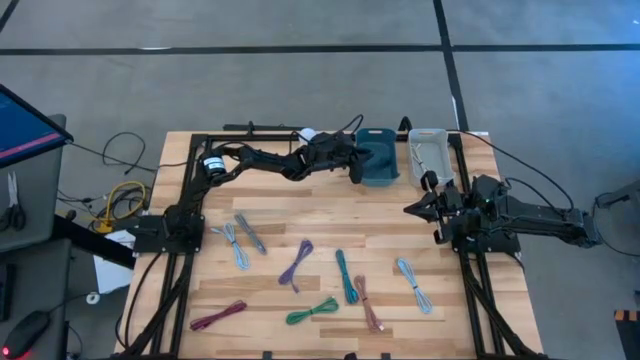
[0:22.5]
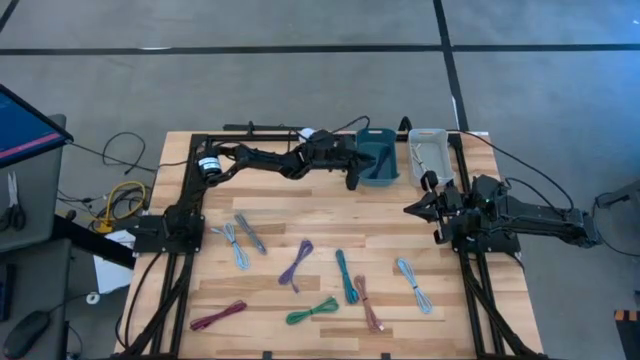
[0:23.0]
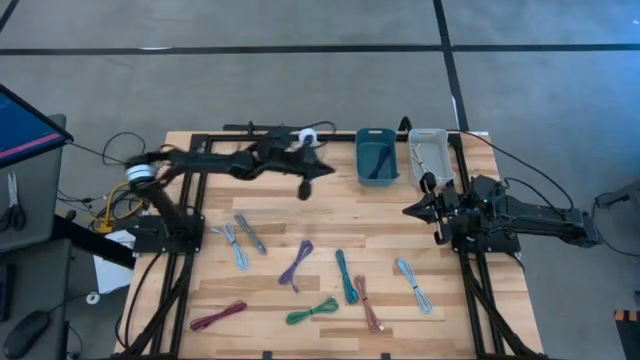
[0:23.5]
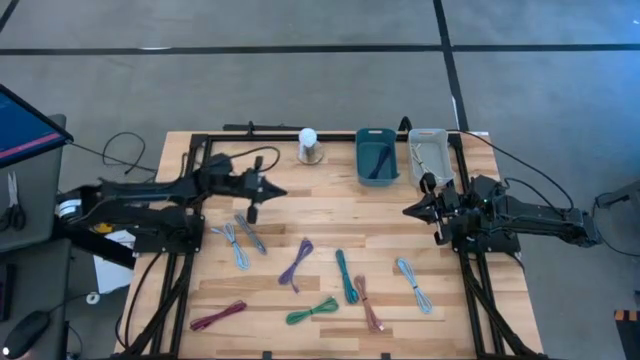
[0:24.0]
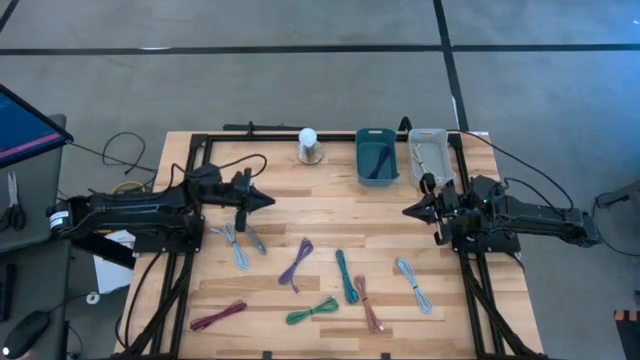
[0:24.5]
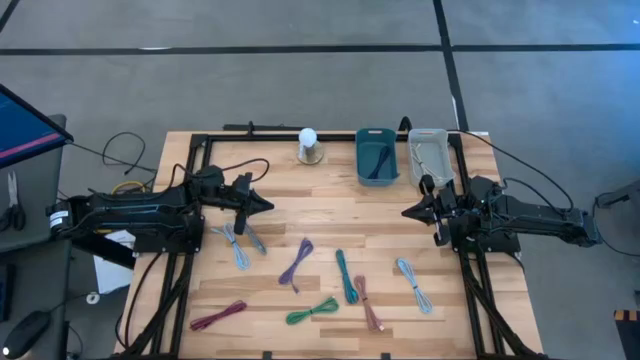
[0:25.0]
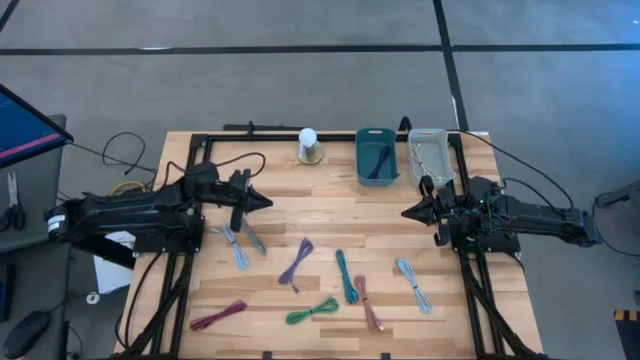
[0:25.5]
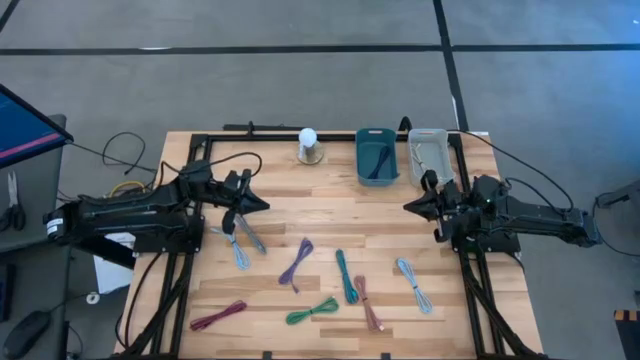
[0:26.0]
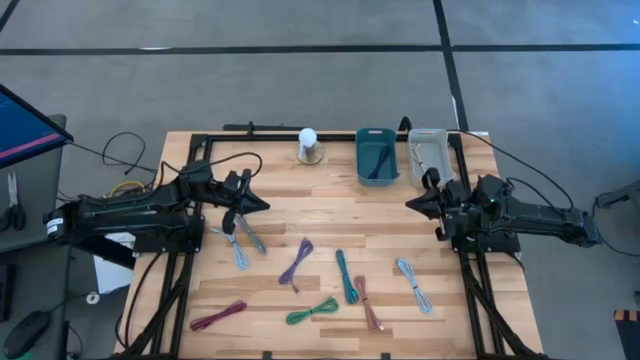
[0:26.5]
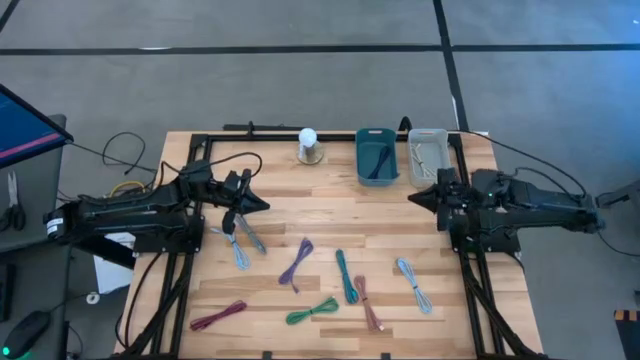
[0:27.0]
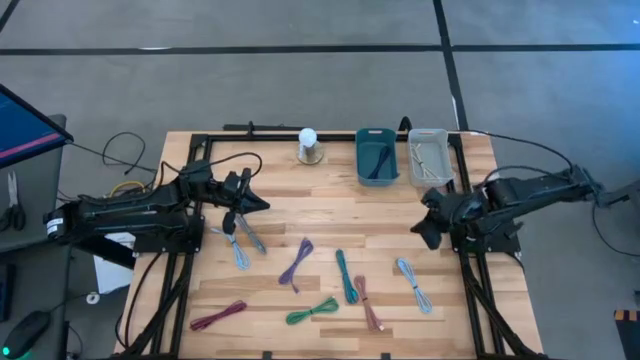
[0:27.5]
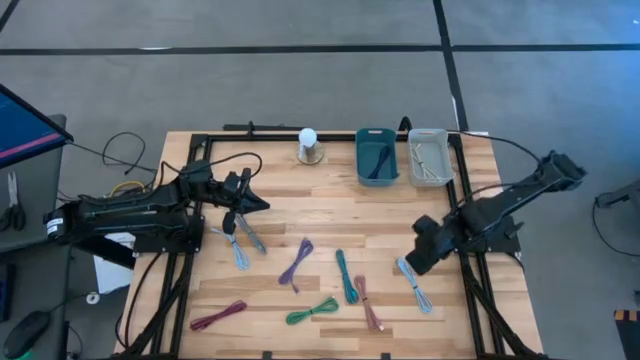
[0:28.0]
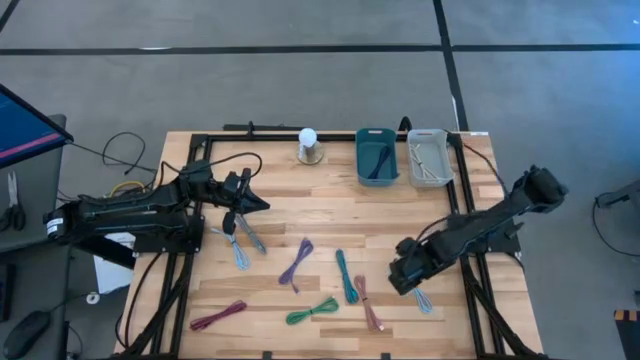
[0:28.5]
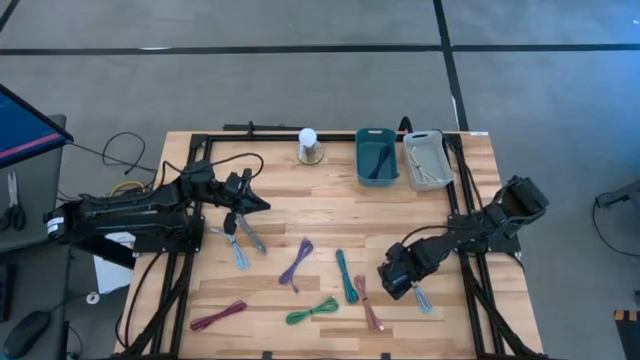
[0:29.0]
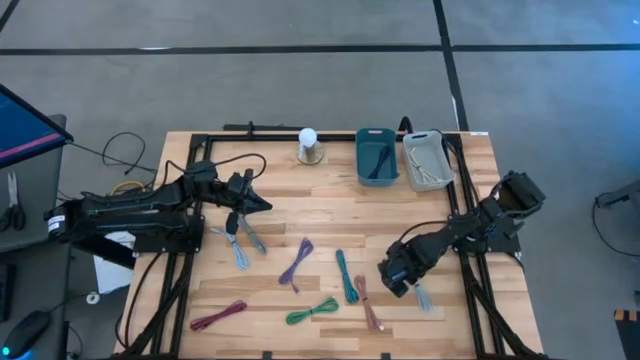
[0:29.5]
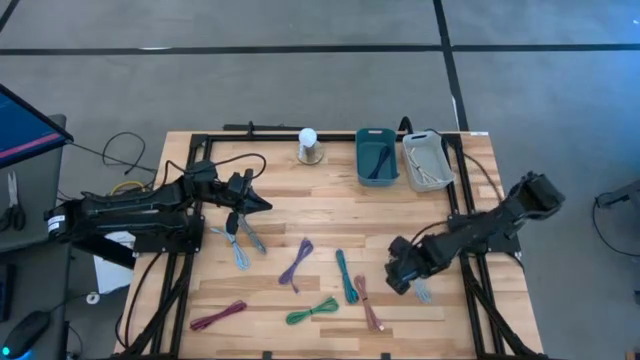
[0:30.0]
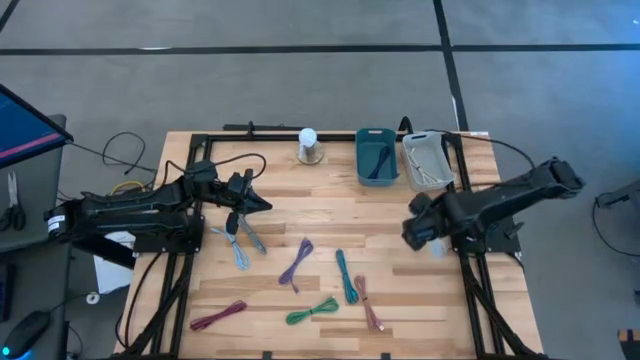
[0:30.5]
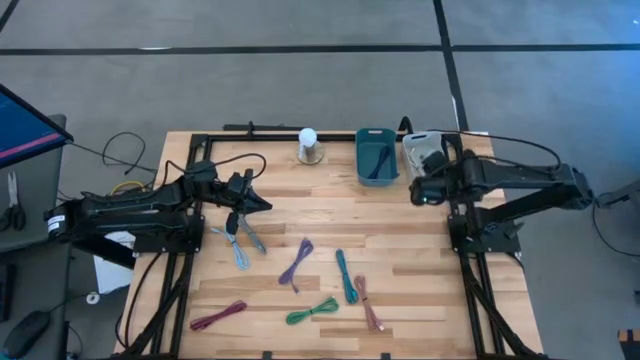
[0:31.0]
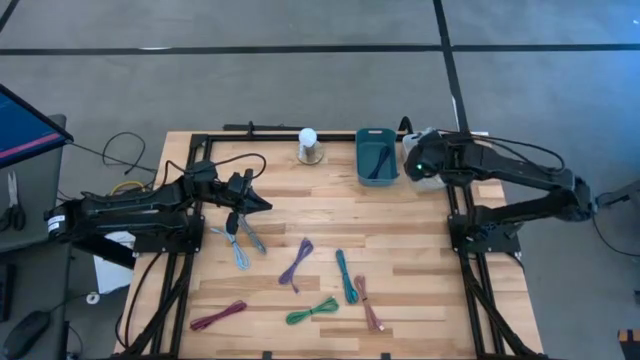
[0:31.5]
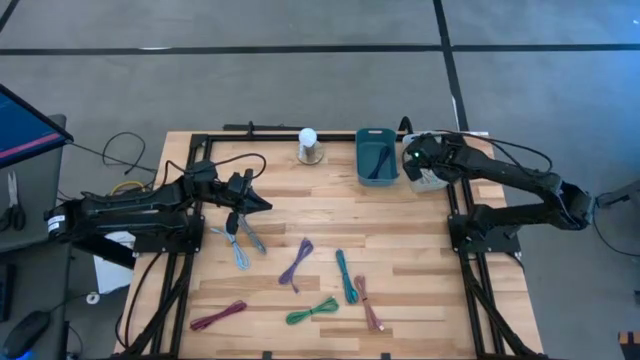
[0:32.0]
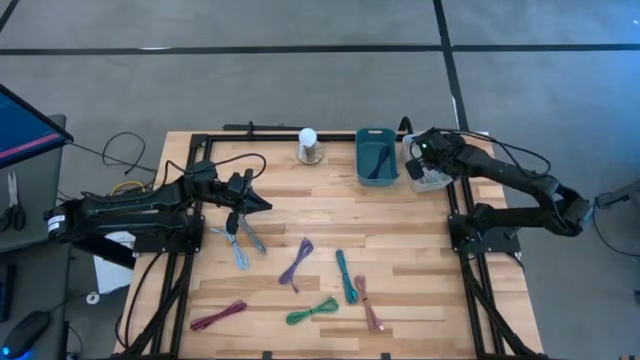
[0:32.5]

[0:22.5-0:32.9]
Task: Pick & Place USB Port
Put the white charger cable into the gray bin

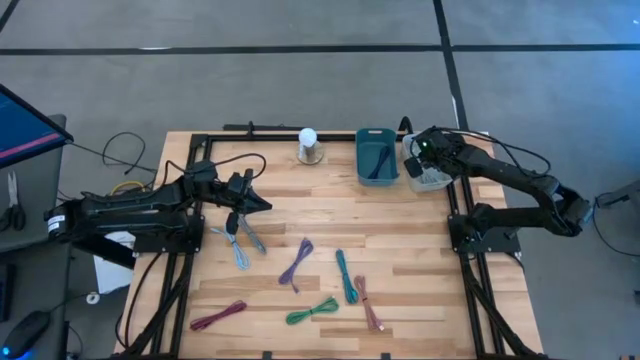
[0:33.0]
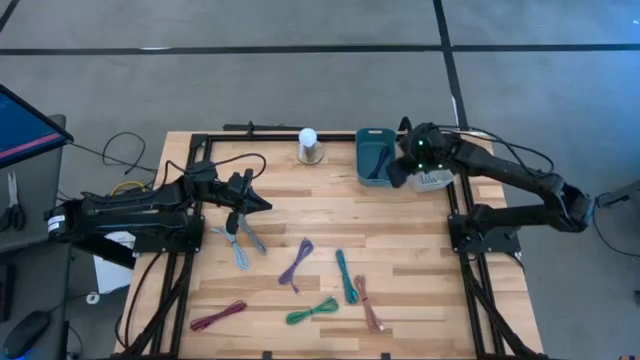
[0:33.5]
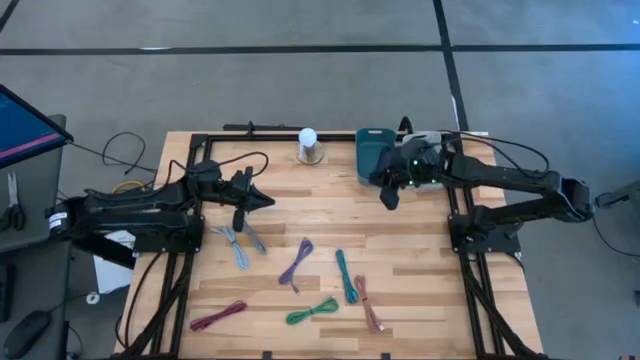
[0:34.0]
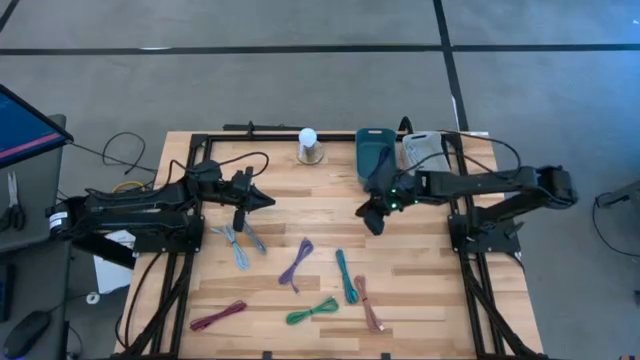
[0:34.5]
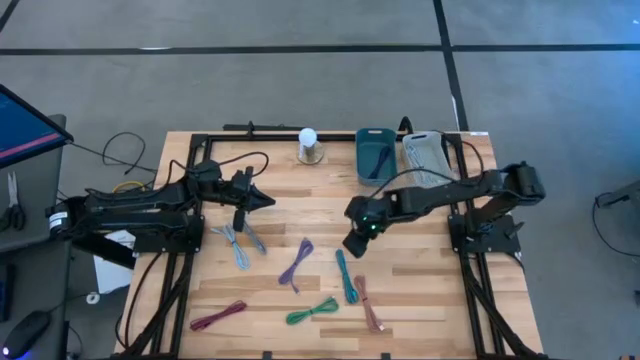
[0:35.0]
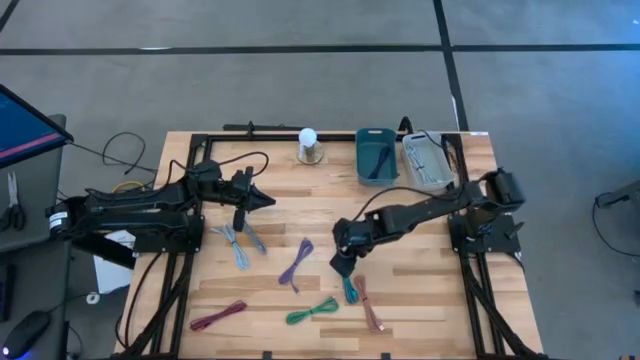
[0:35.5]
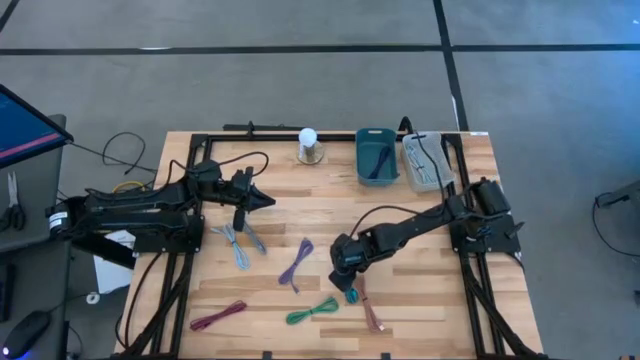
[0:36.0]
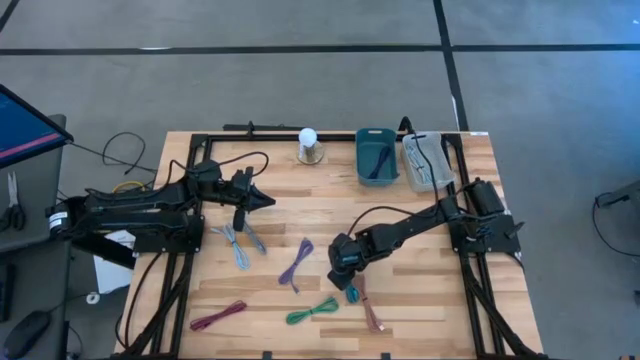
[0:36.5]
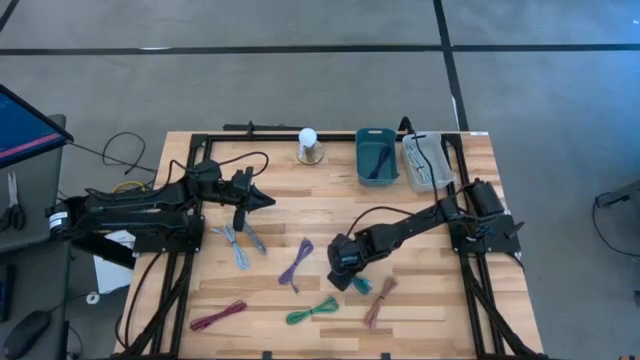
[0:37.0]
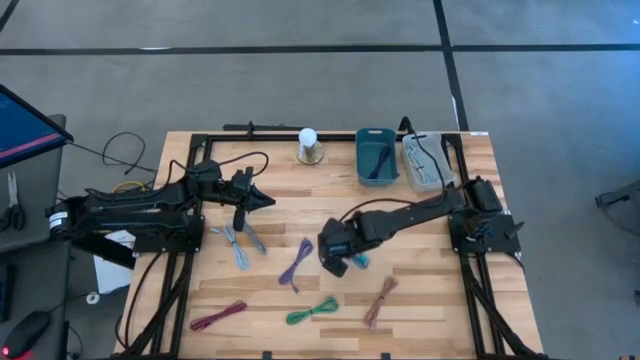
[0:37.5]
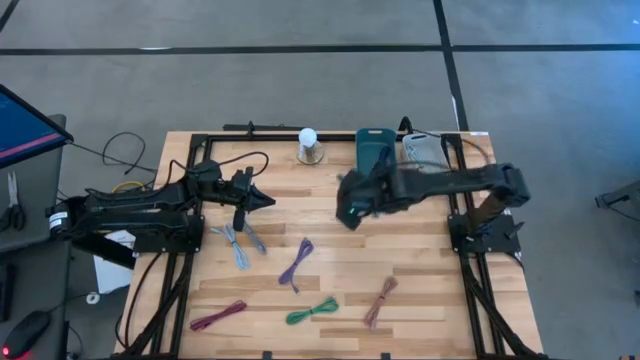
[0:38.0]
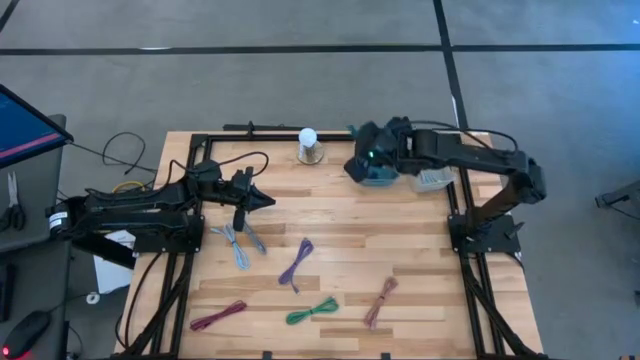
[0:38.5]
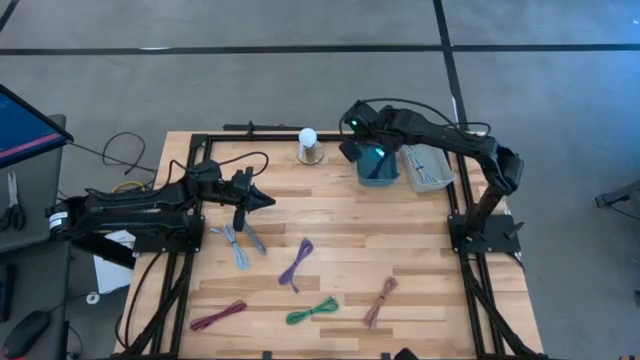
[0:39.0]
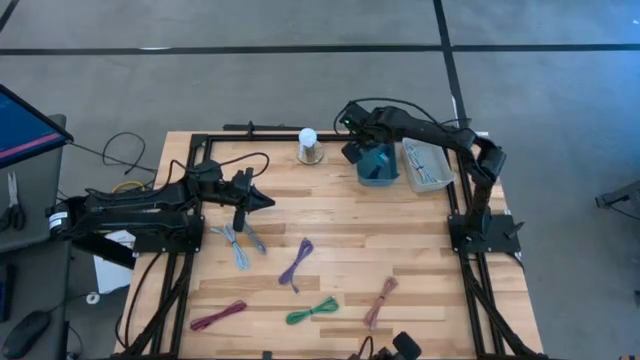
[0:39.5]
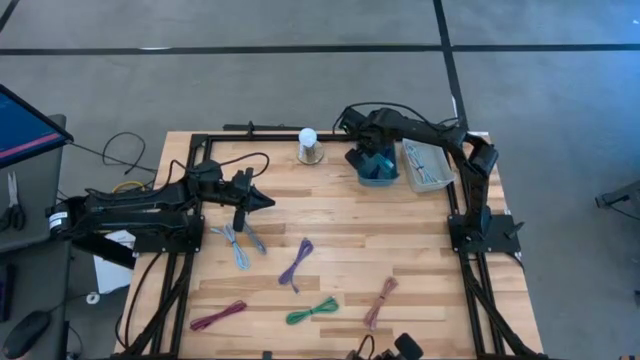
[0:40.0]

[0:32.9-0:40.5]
Put the light braided blue charger cable into the blue bin

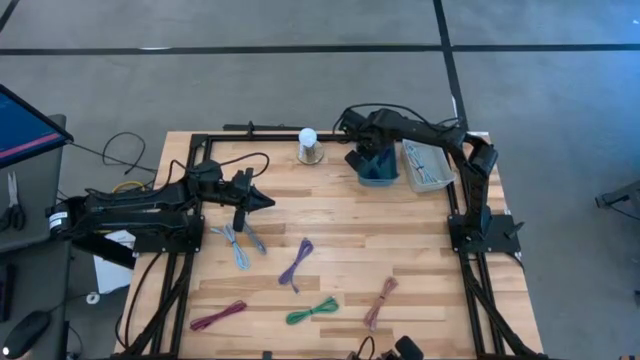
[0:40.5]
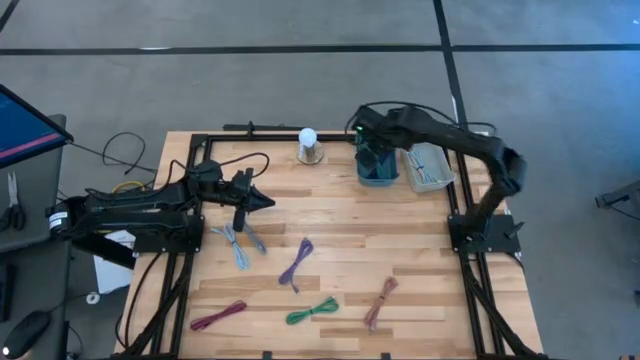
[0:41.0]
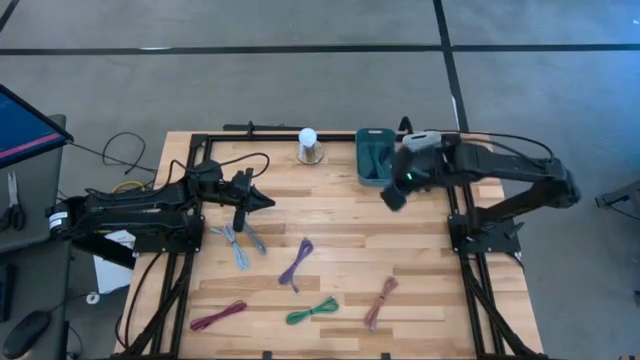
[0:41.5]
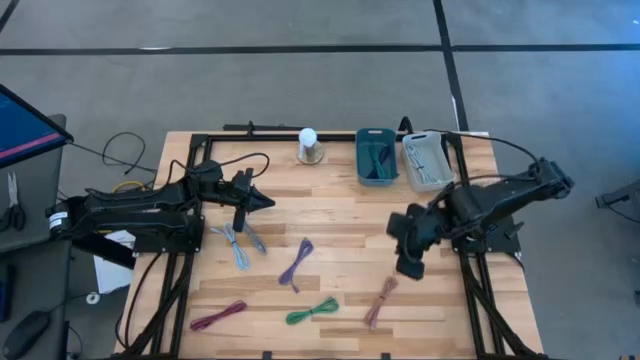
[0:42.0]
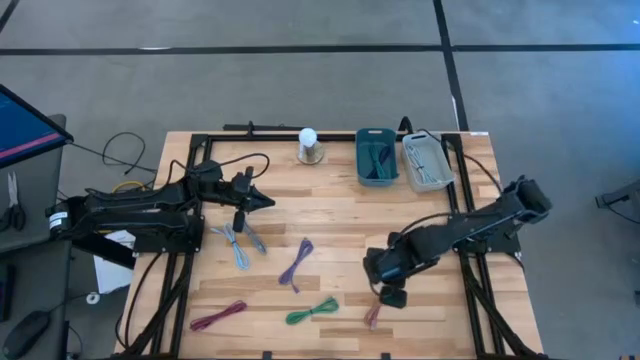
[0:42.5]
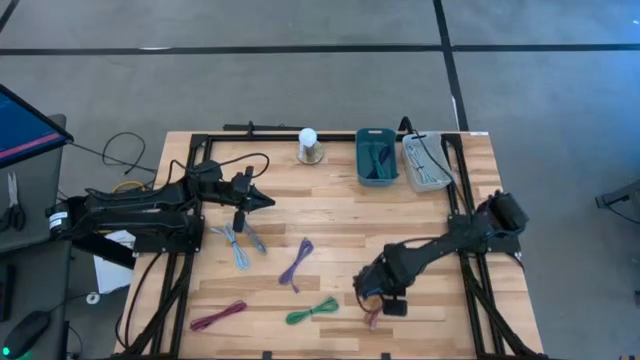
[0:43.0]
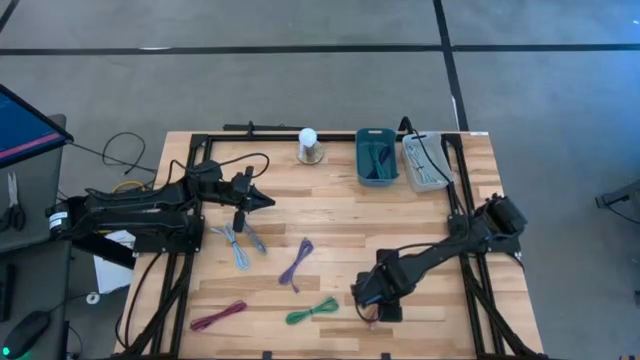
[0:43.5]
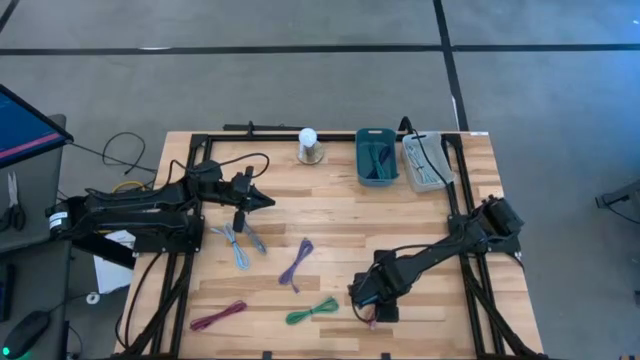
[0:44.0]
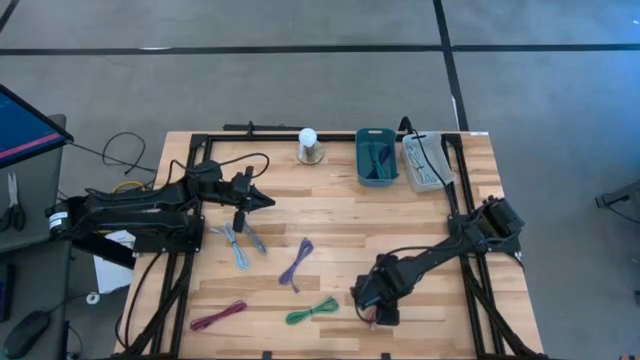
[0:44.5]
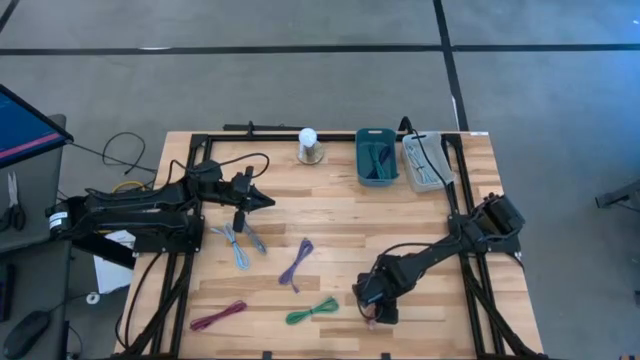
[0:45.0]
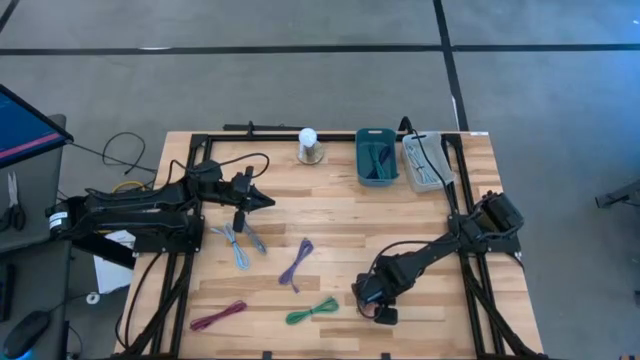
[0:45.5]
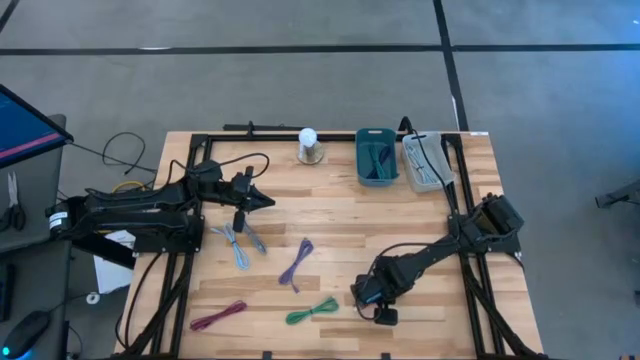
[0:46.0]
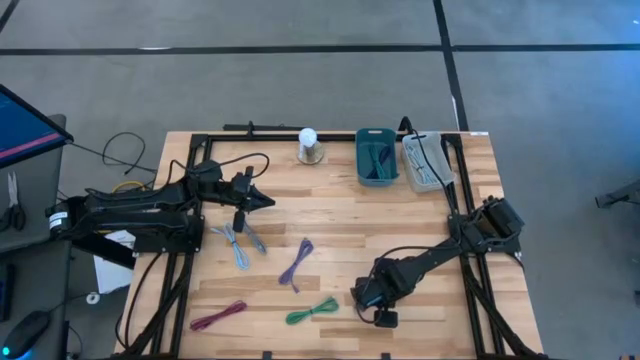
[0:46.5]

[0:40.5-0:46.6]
Put the pink charger cable into the gray bin
